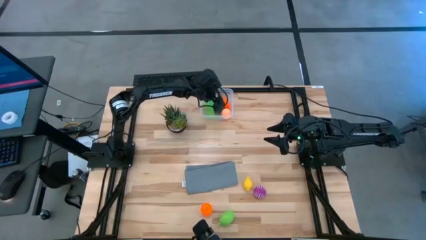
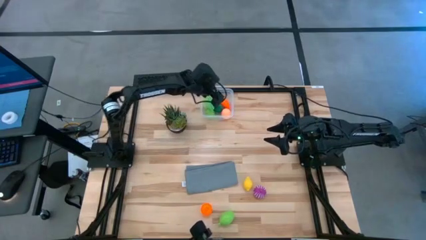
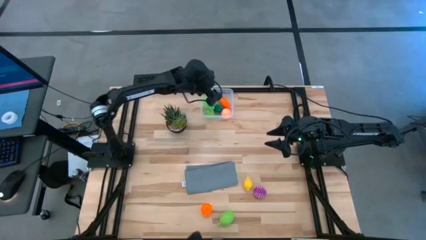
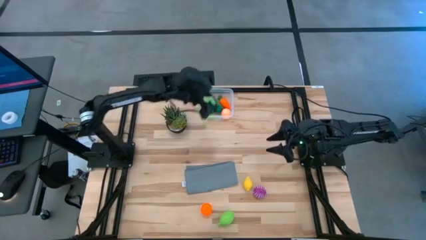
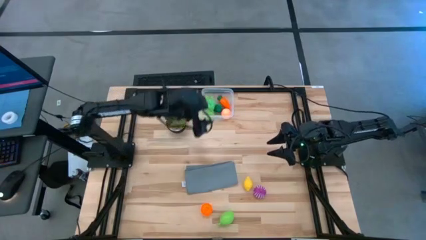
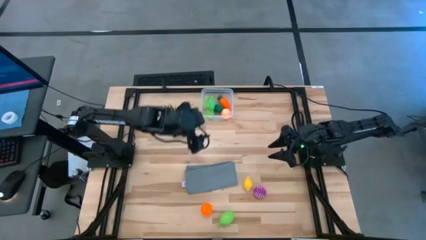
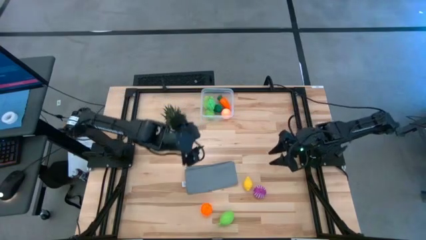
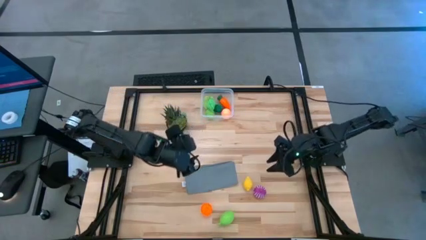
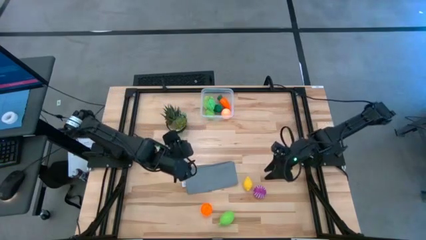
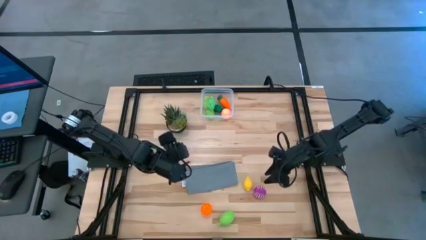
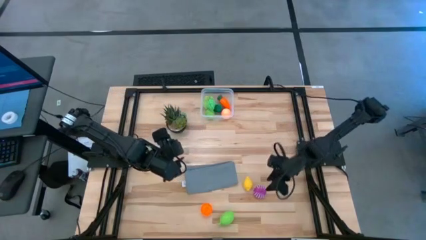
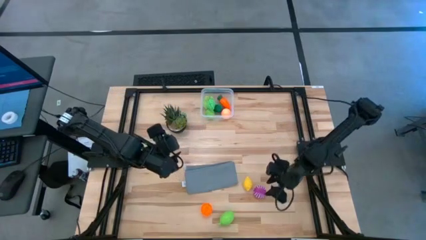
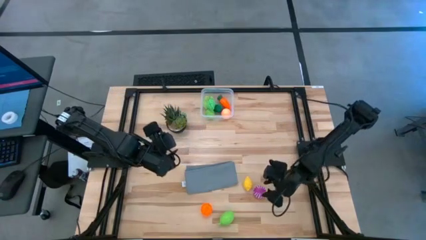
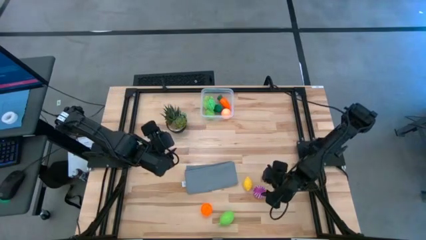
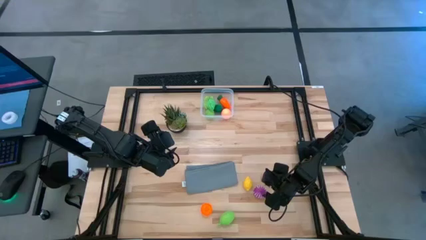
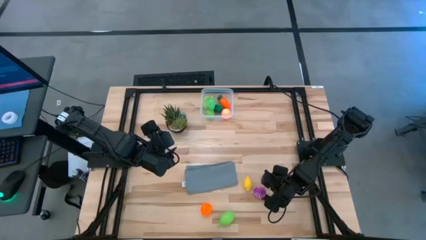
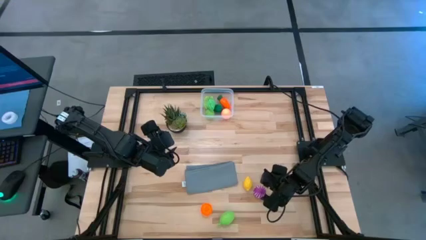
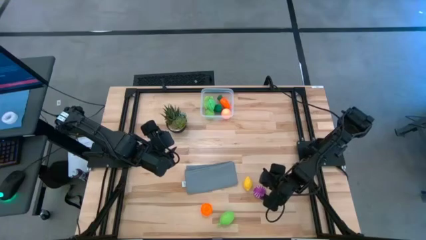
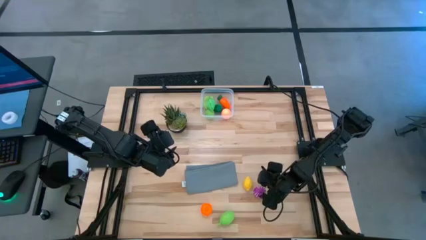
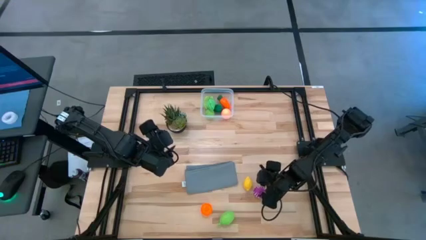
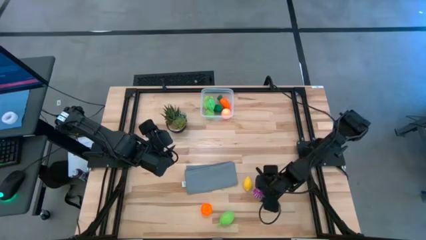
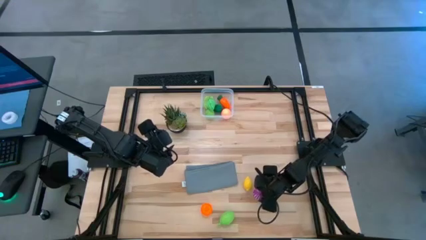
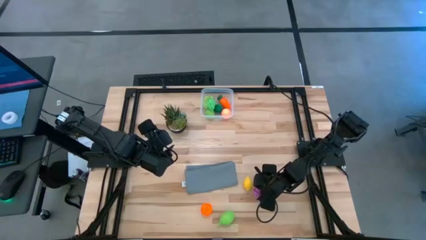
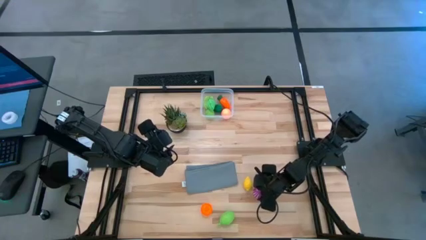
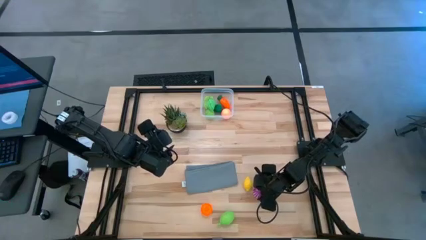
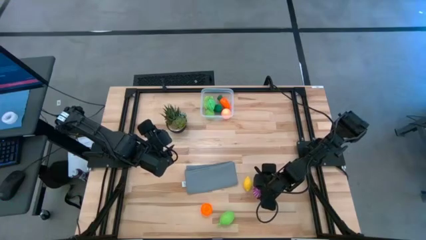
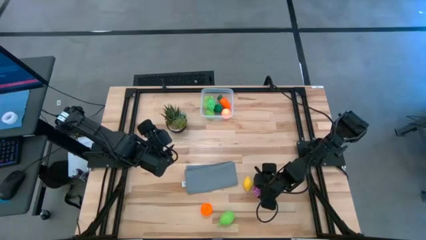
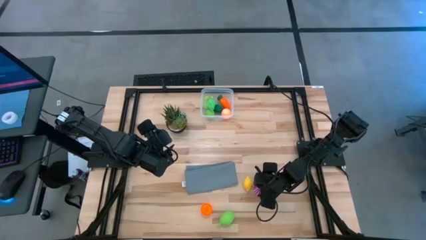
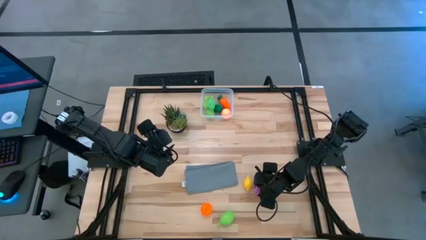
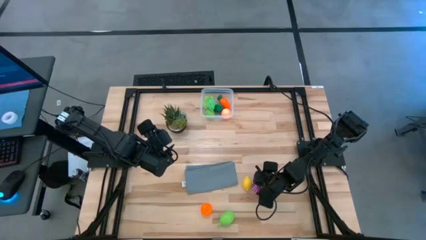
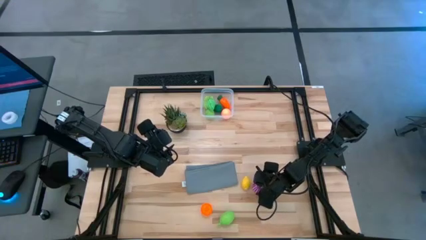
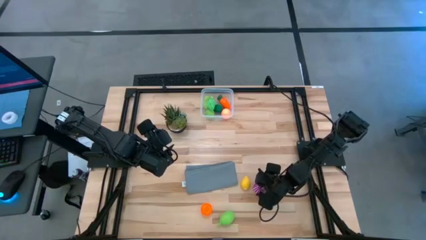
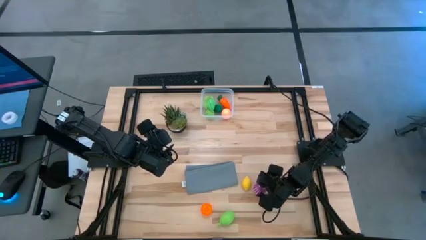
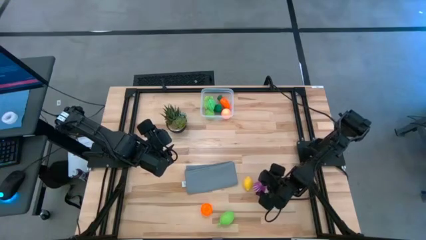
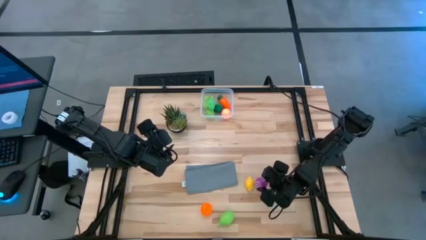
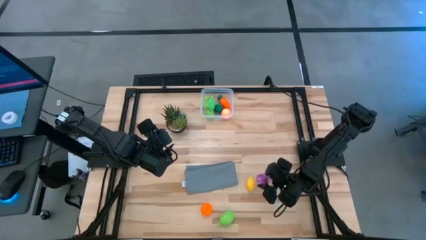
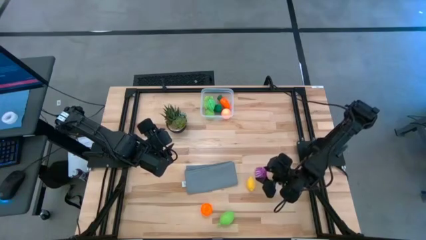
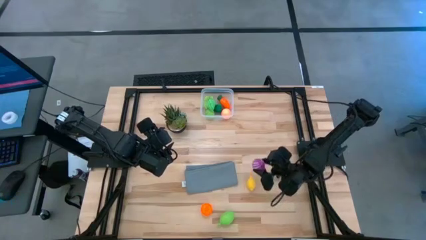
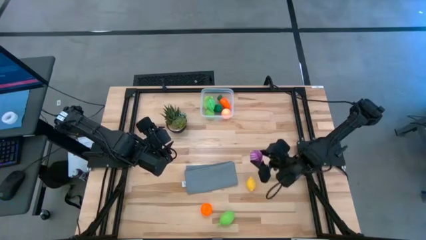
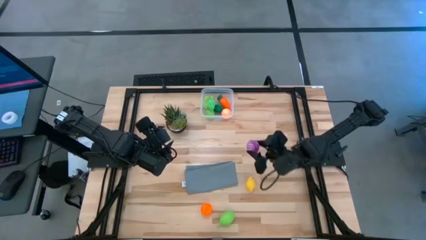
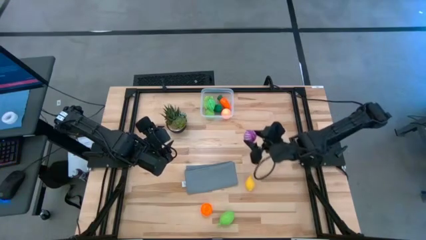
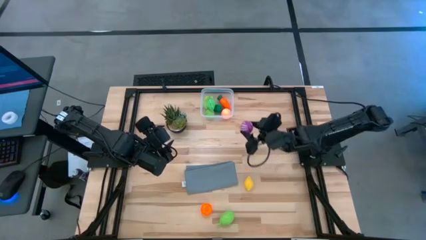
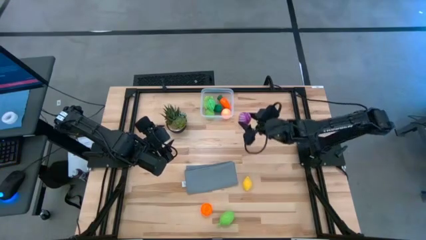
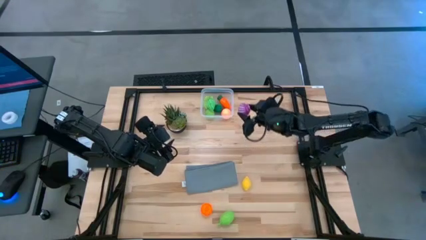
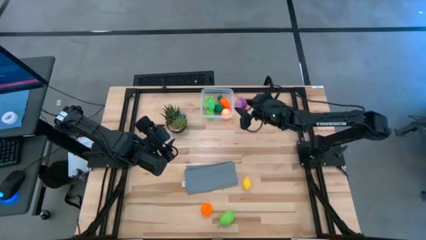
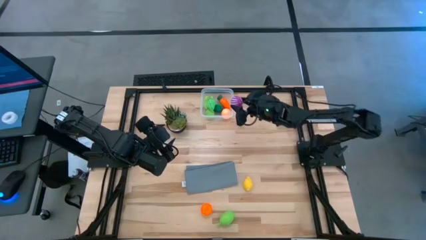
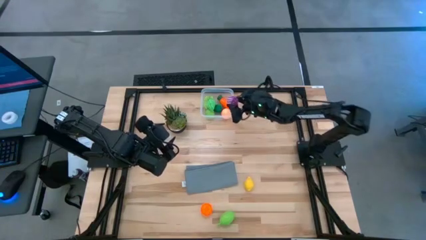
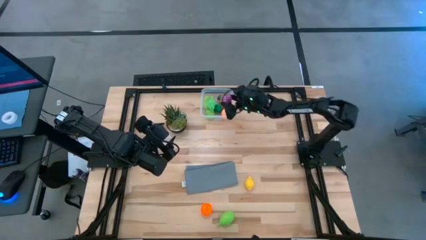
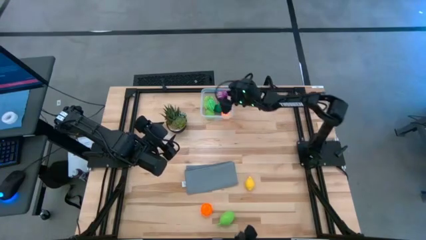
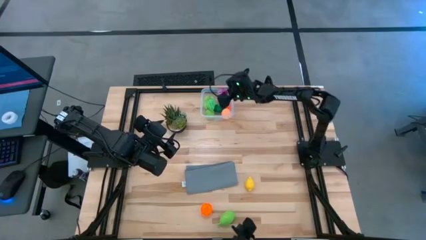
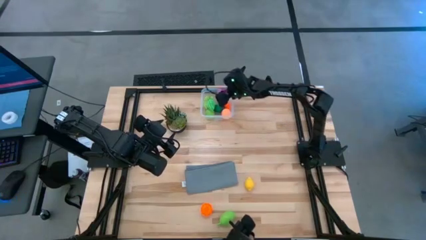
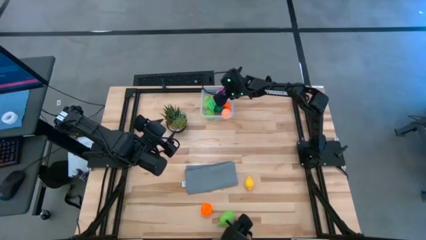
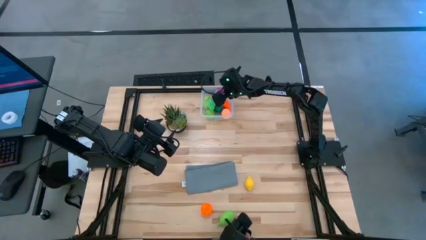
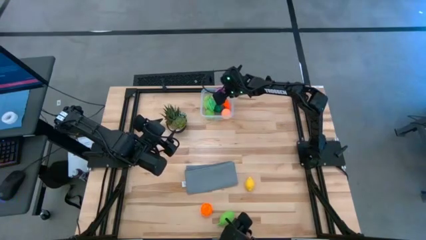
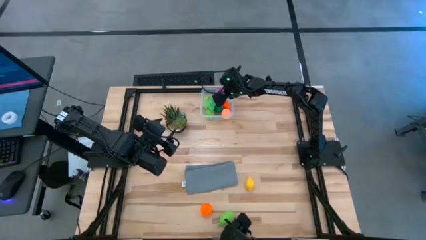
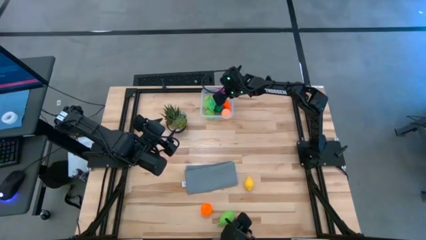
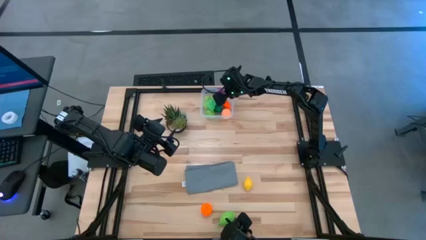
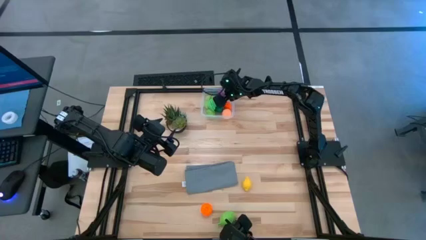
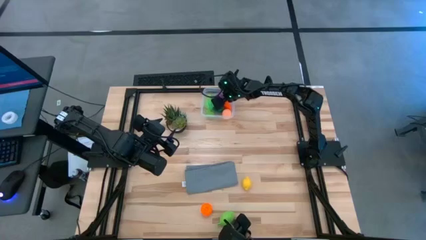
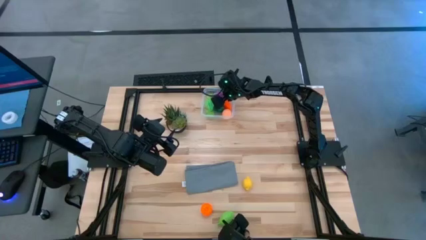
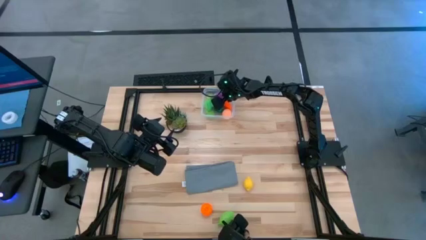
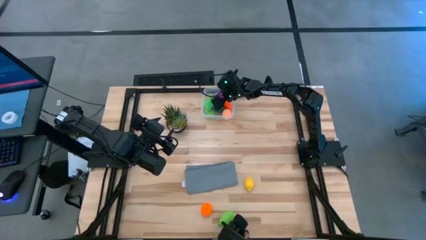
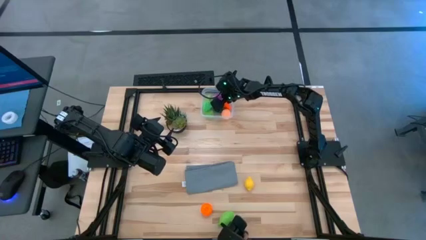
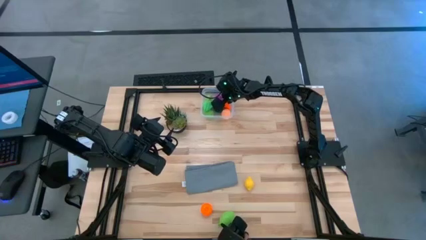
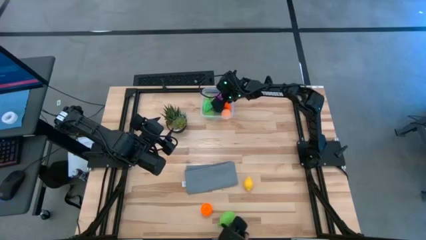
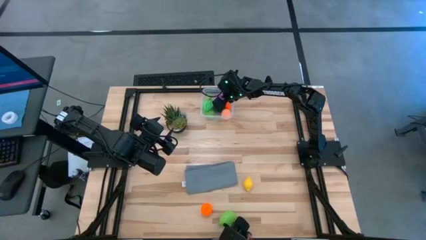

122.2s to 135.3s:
Task: Pick and placing Produce into tupperware
Put the onion into the bin

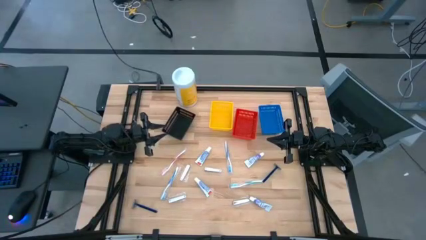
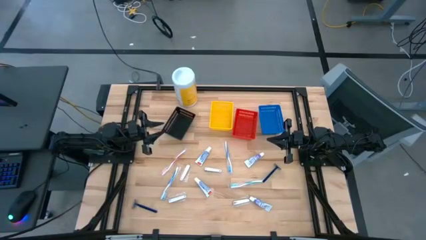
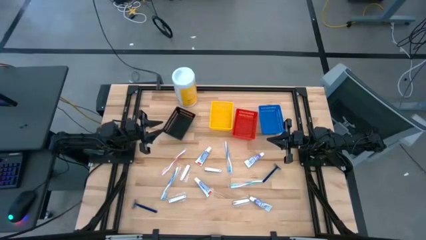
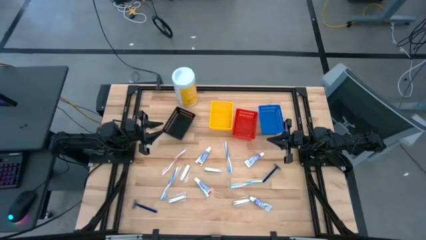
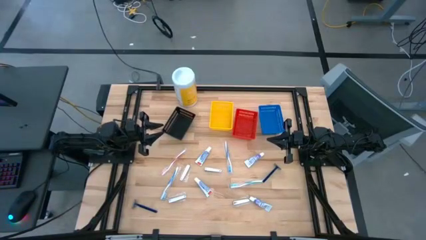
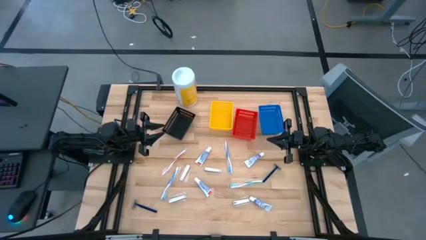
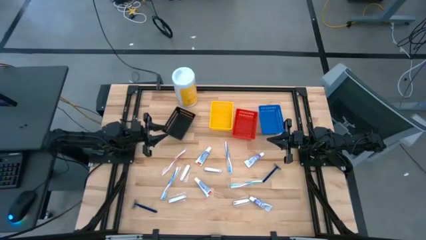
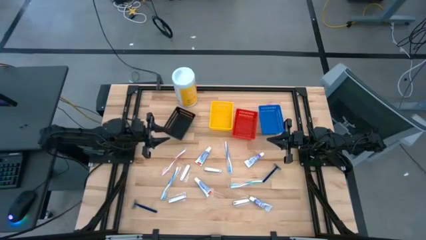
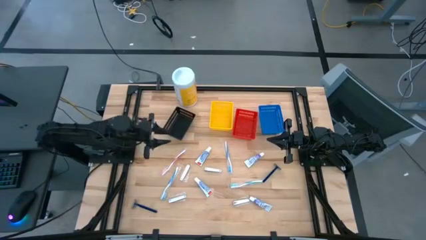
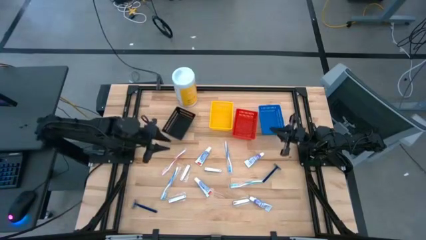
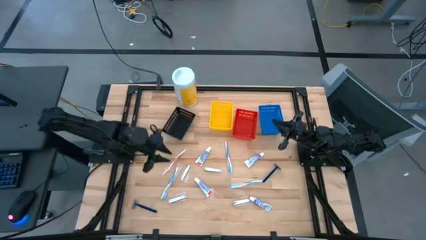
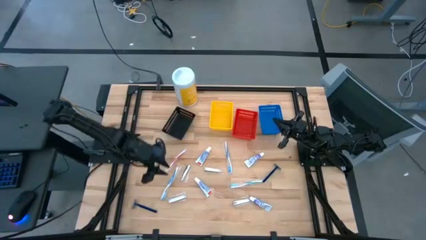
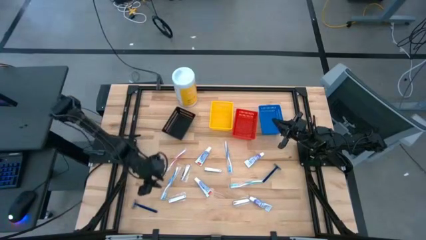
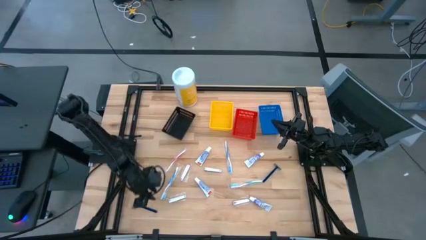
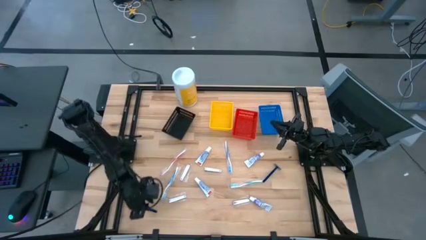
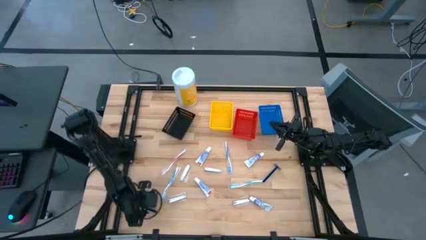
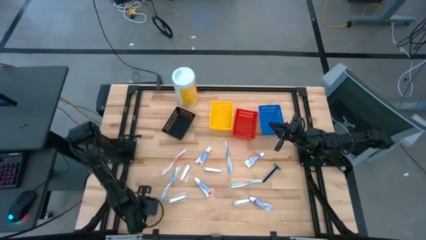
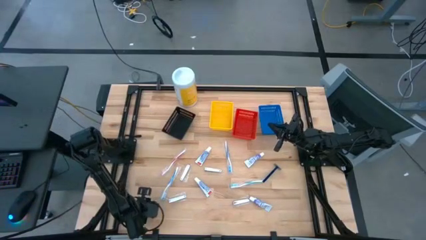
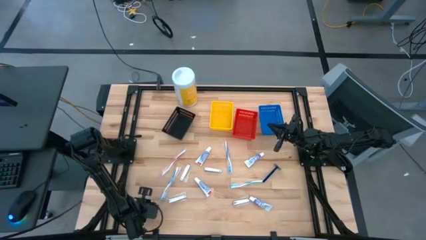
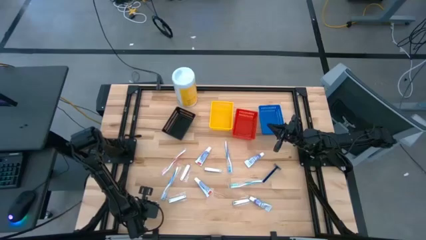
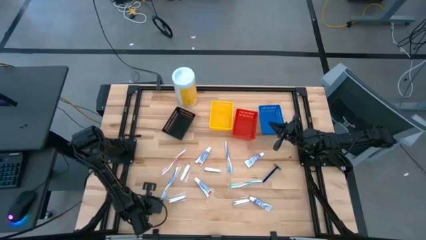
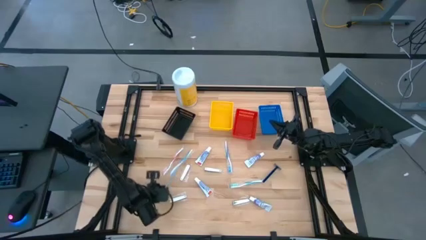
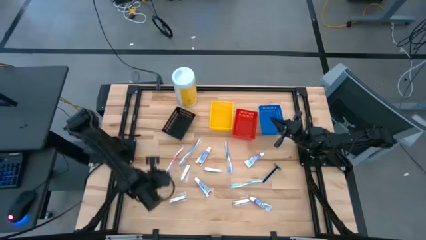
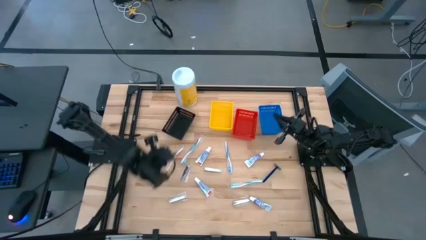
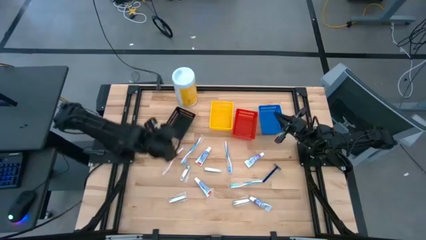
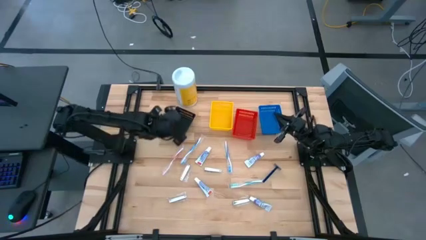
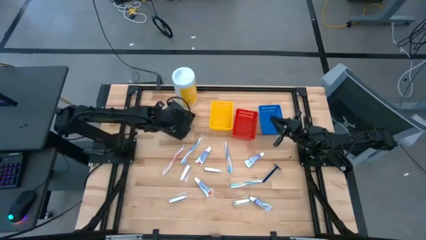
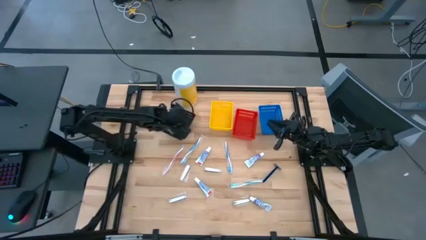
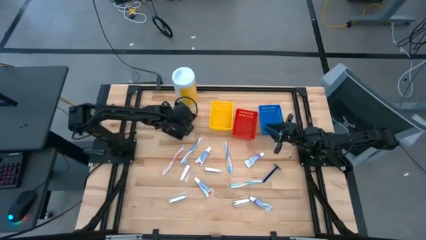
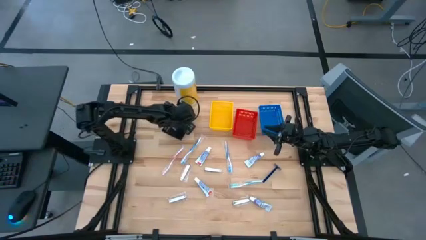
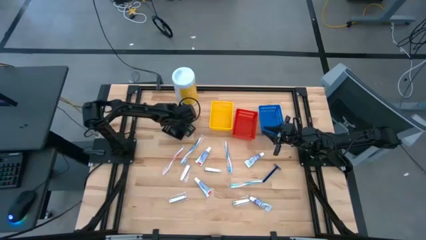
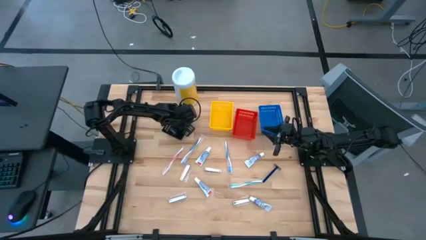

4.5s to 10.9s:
Task: Pick & Place Travel size toiletries
Put the blue razor into the black bin
